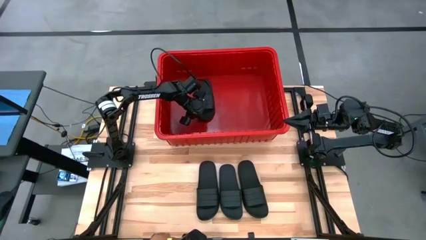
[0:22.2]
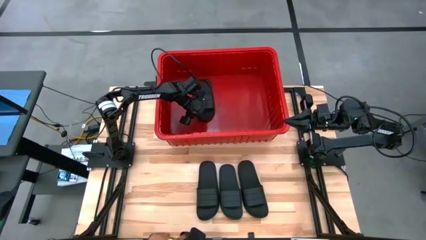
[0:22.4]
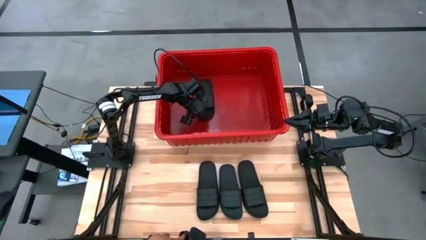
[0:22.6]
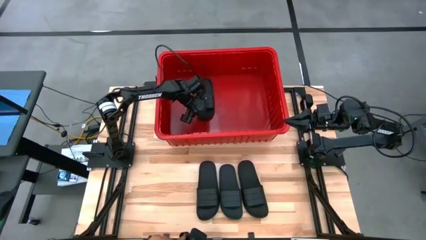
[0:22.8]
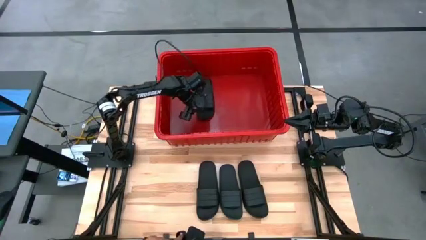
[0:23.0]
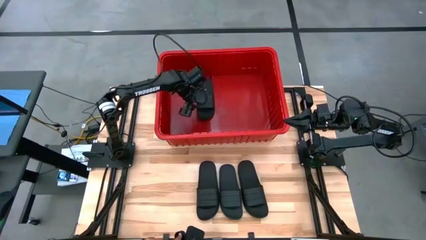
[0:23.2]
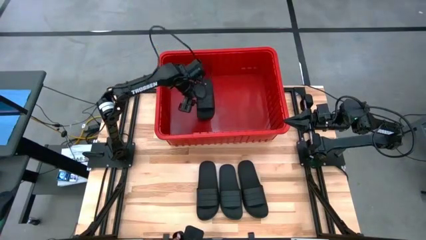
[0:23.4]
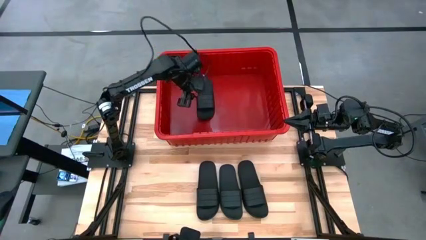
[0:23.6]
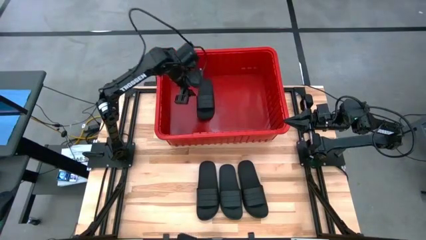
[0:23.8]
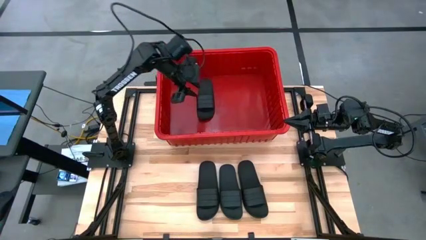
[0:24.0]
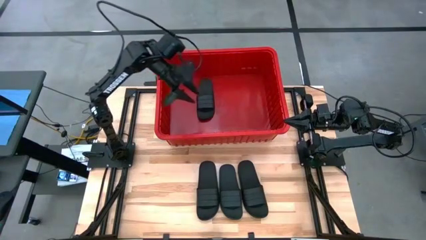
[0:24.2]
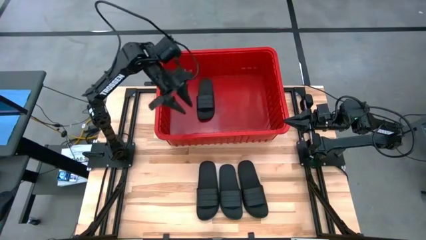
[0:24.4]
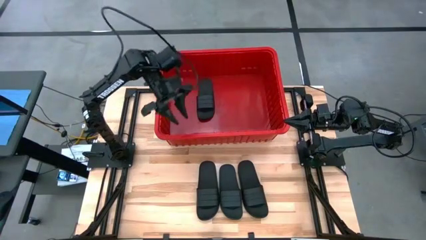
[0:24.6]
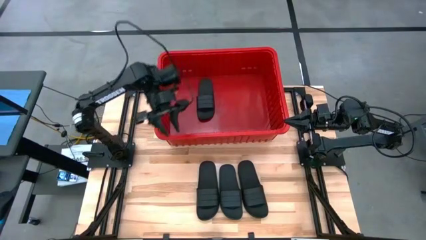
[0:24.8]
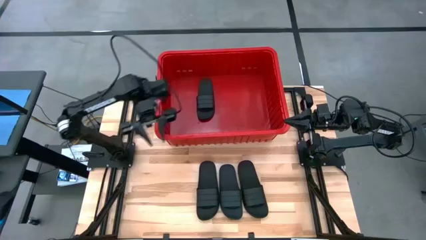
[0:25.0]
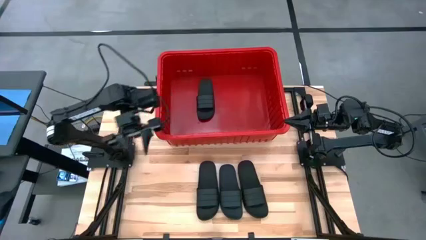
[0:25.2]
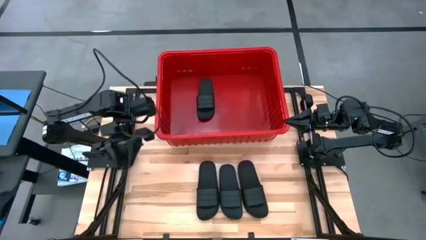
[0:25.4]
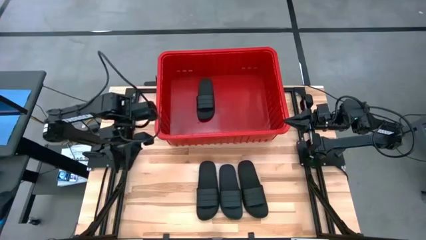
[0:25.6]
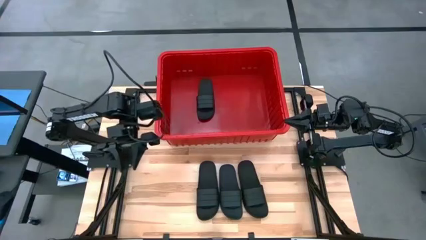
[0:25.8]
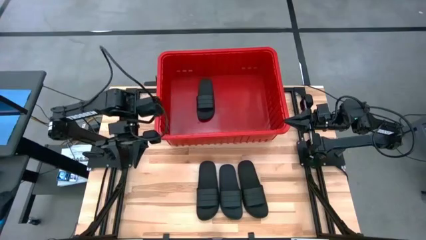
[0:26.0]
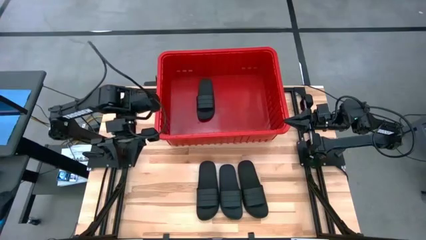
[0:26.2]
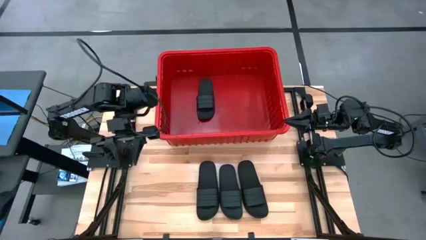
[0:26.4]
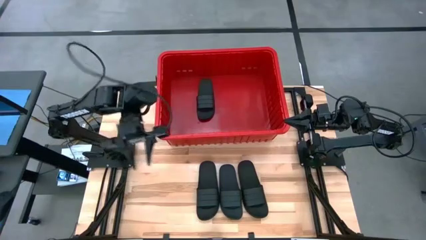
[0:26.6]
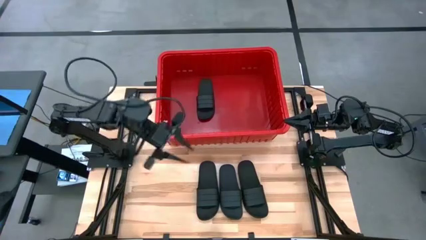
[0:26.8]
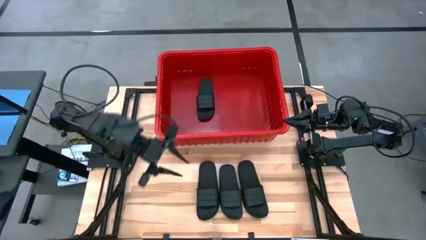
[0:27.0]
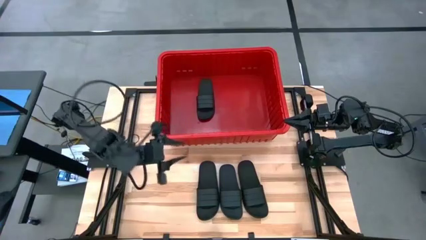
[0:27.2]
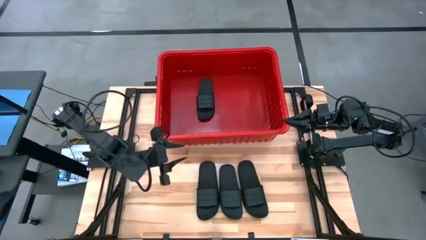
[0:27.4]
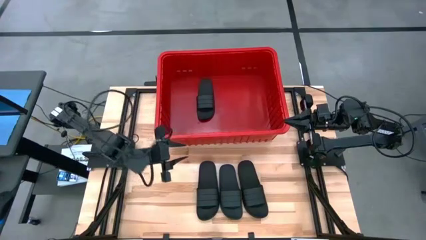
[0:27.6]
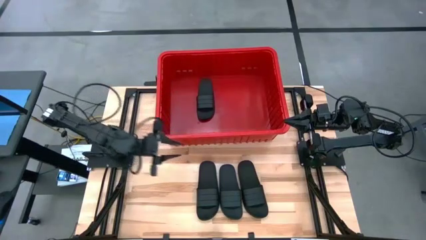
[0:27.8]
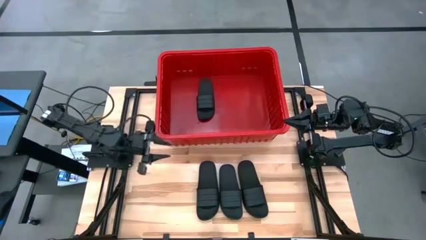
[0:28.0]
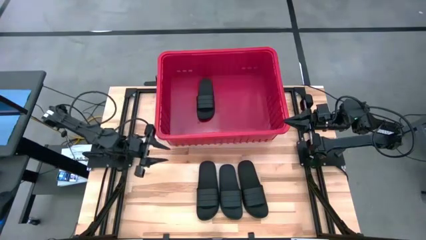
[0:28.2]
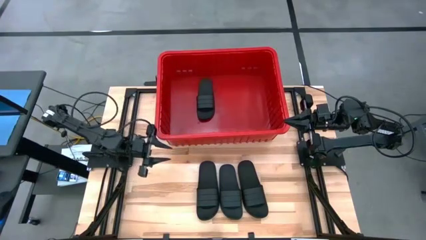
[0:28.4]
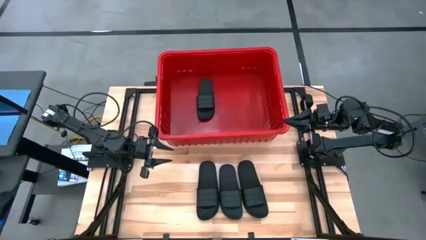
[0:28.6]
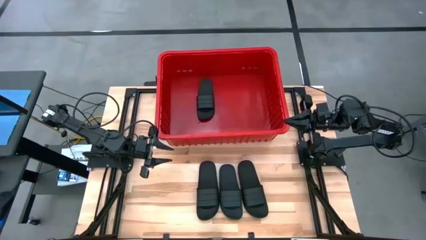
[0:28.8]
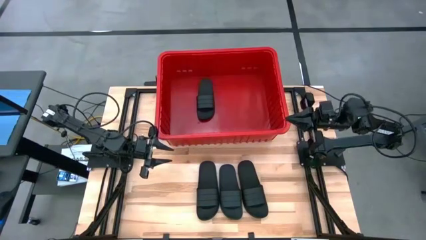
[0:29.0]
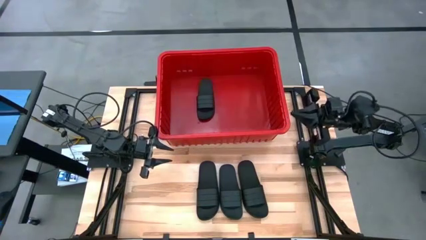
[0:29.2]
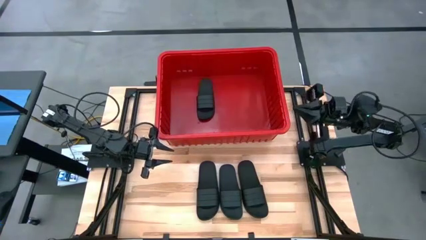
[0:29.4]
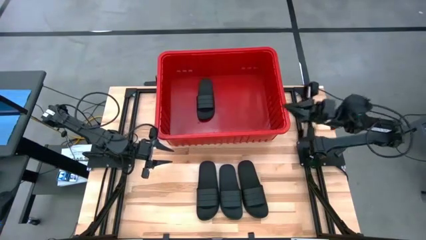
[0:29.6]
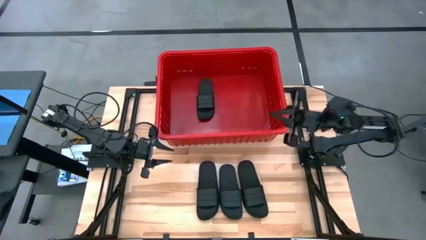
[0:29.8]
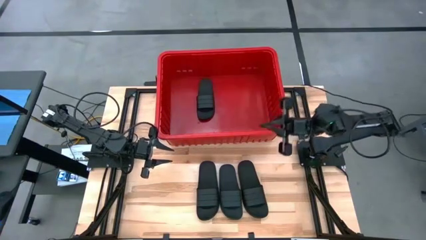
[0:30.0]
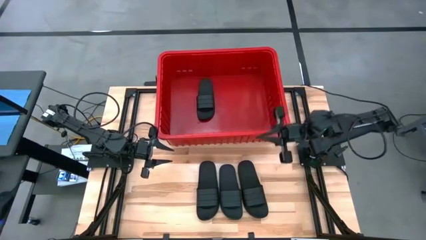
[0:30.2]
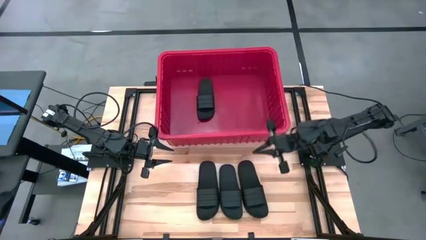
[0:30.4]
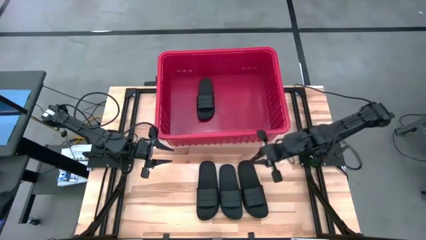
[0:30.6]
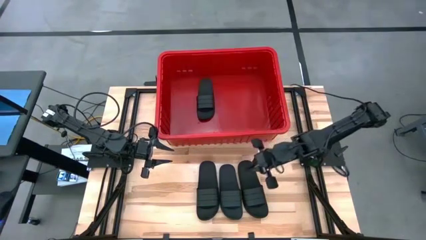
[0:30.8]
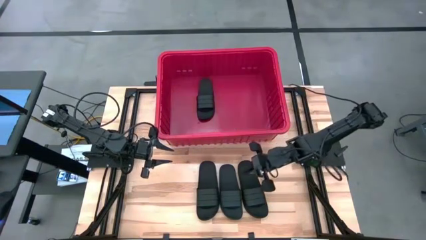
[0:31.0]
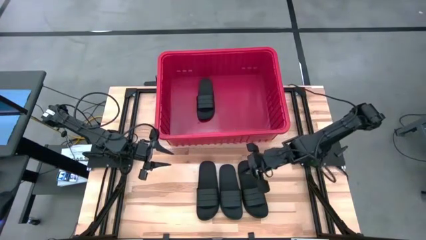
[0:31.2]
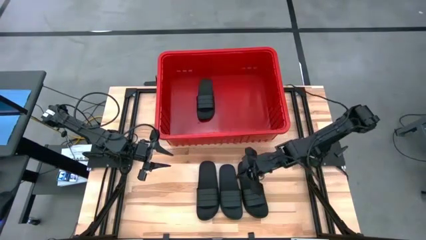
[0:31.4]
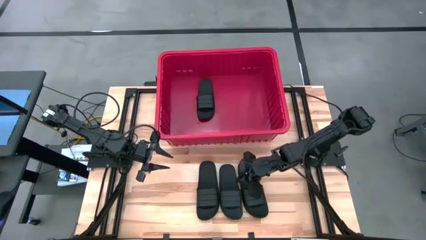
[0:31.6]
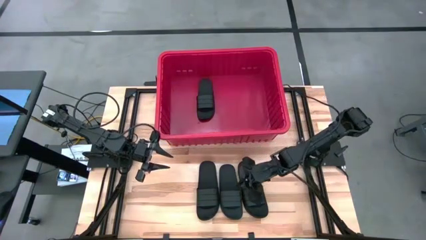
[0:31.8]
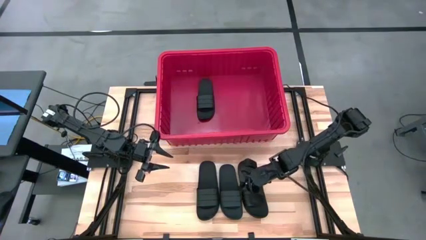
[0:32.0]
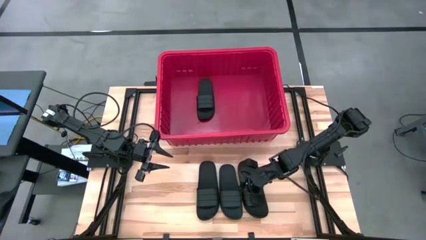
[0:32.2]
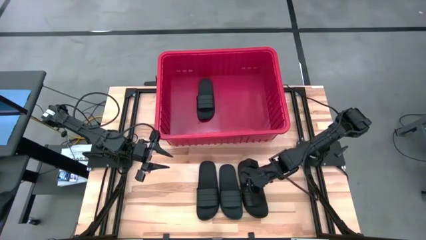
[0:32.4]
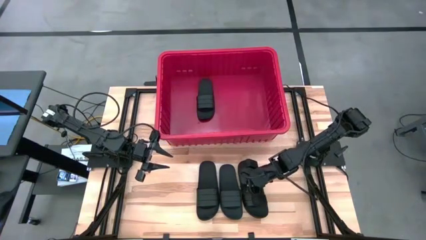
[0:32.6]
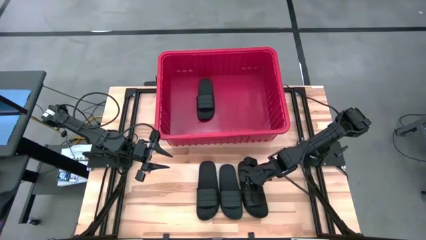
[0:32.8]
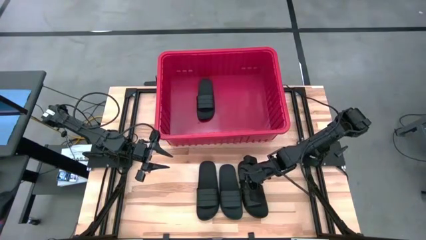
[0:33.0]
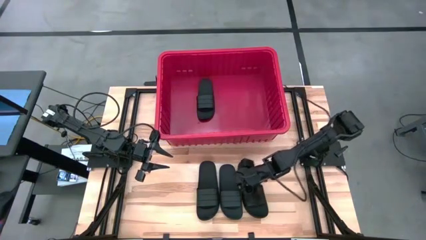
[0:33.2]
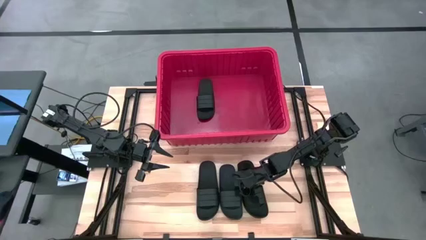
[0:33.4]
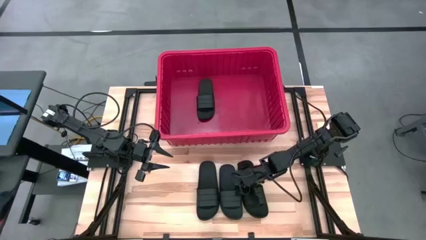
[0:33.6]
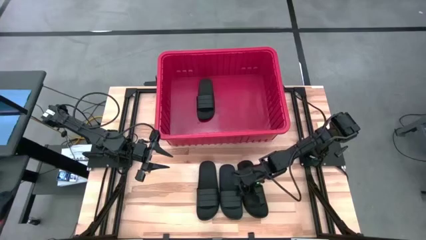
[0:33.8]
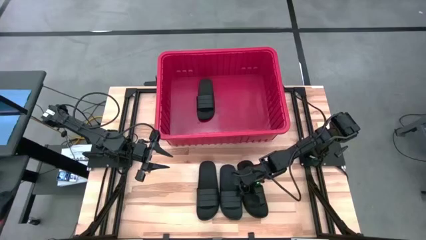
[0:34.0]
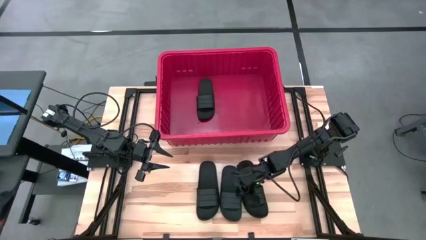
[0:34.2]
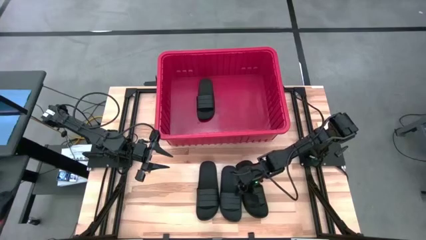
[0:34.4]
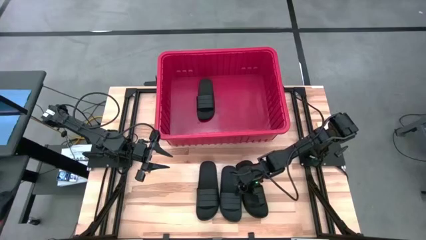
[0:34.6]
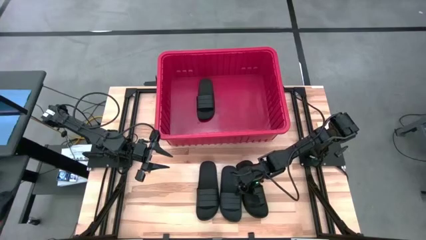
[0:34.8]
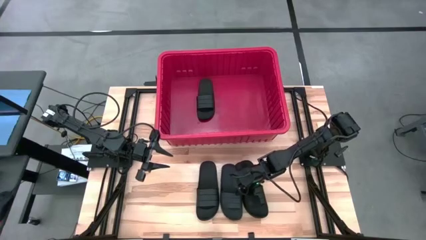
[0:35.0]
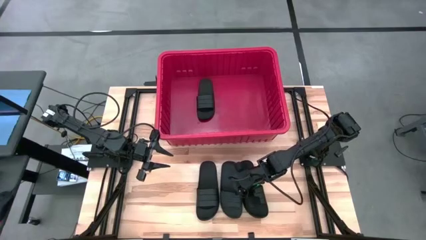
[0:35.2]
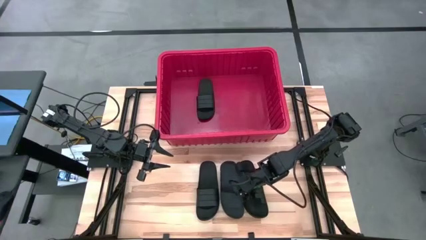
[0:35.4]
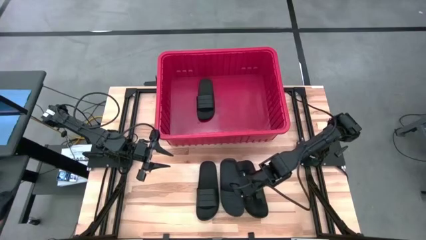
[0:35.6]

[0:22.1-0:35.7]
Task: Pick and place slides into bin
Put the center slide into the bin
